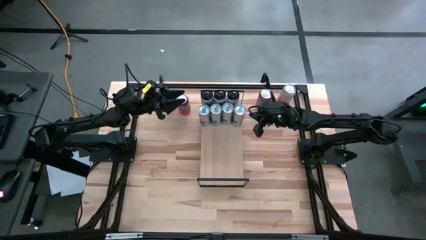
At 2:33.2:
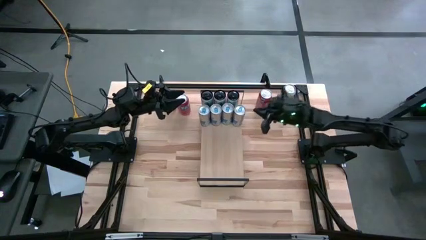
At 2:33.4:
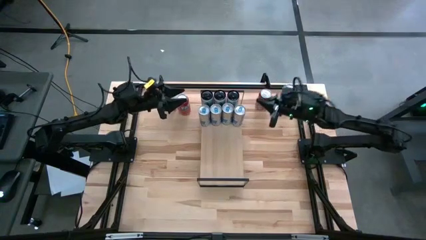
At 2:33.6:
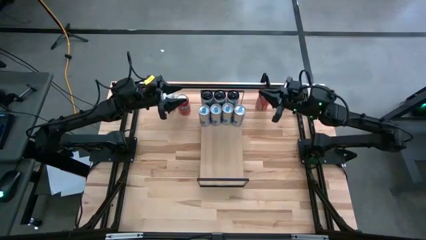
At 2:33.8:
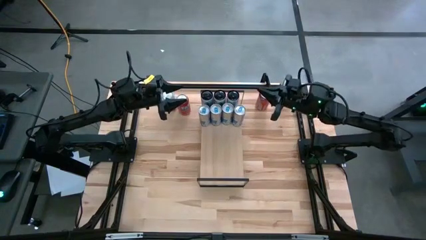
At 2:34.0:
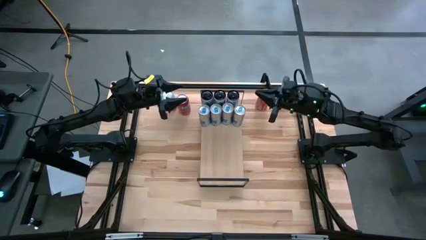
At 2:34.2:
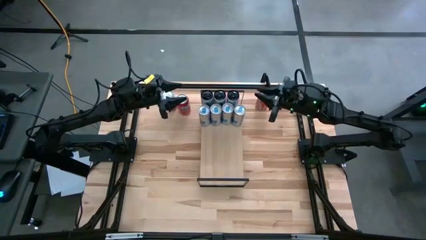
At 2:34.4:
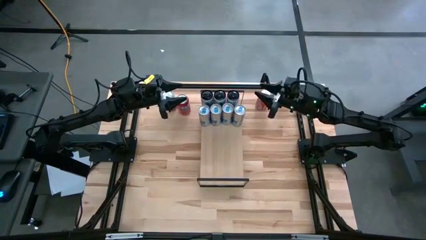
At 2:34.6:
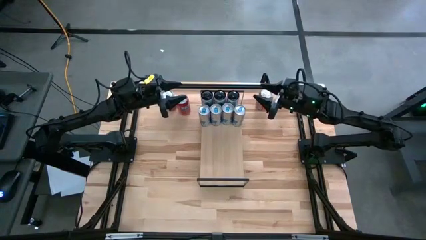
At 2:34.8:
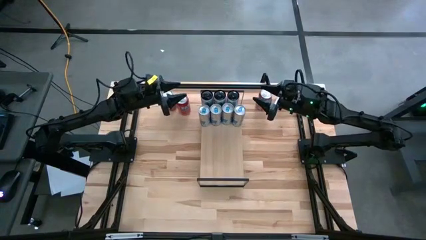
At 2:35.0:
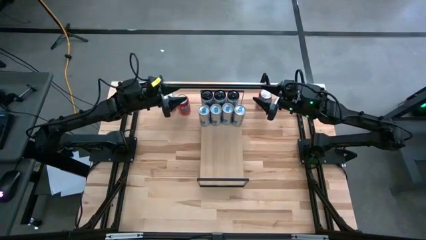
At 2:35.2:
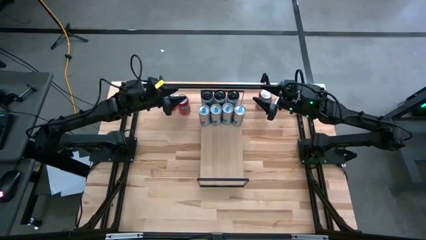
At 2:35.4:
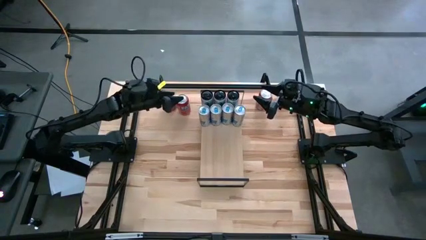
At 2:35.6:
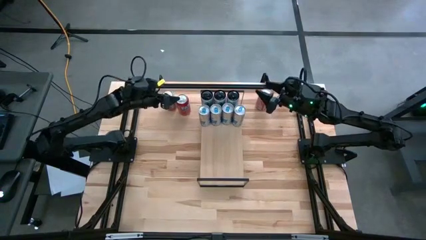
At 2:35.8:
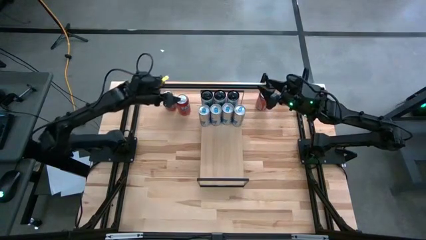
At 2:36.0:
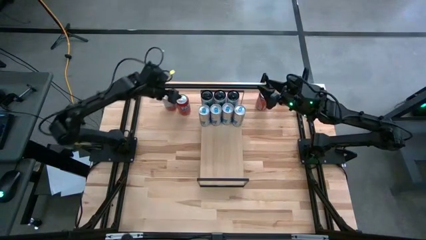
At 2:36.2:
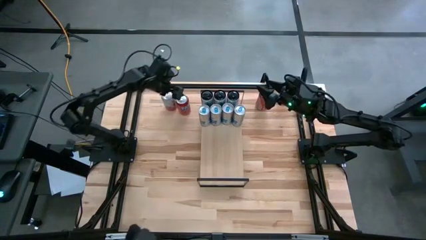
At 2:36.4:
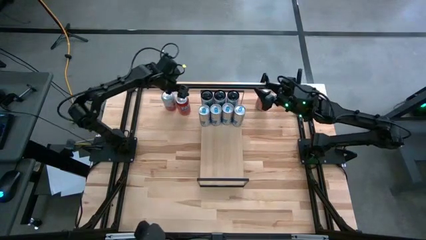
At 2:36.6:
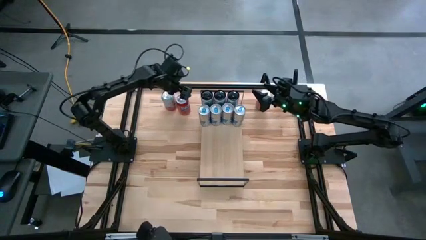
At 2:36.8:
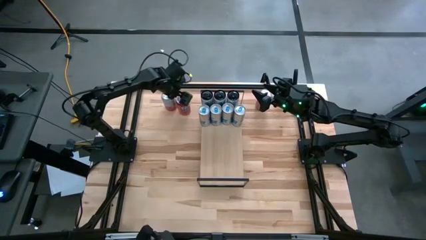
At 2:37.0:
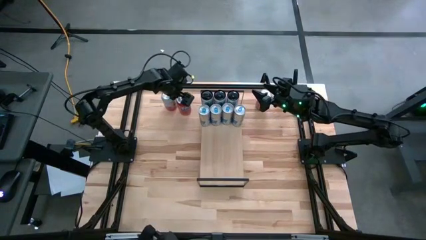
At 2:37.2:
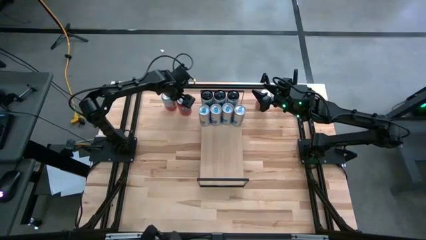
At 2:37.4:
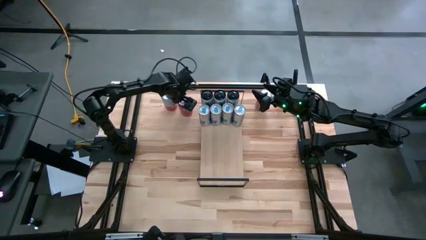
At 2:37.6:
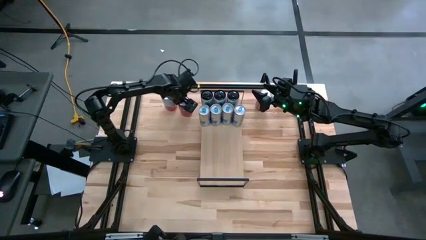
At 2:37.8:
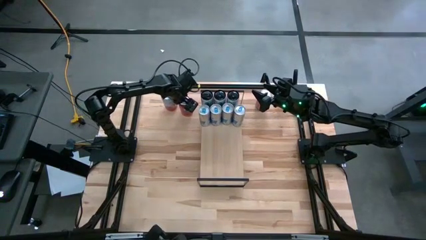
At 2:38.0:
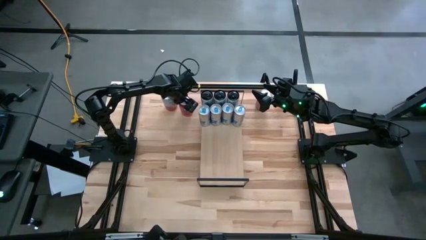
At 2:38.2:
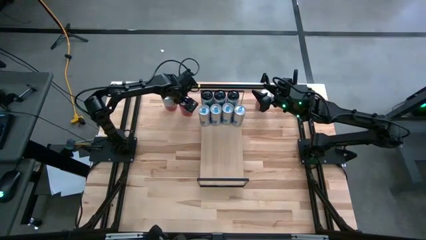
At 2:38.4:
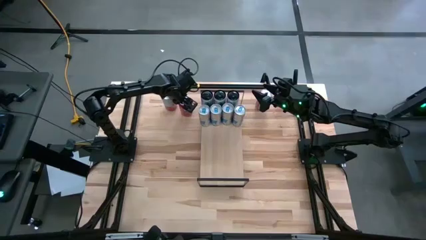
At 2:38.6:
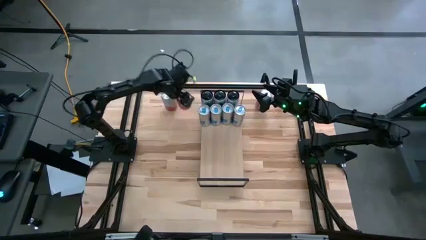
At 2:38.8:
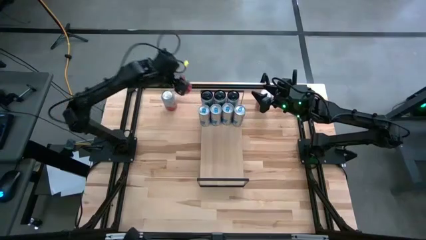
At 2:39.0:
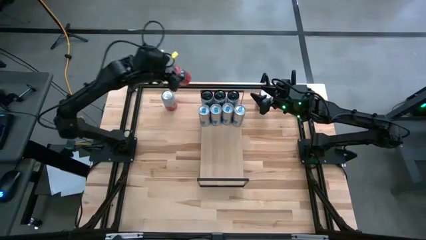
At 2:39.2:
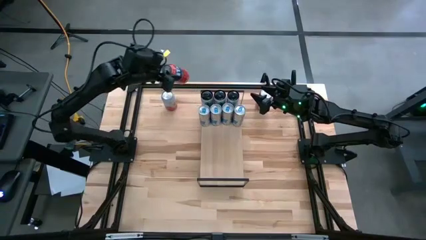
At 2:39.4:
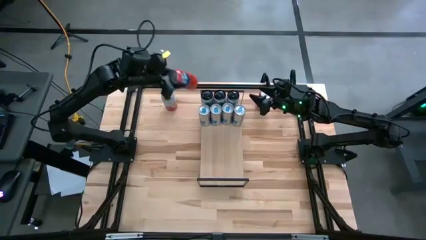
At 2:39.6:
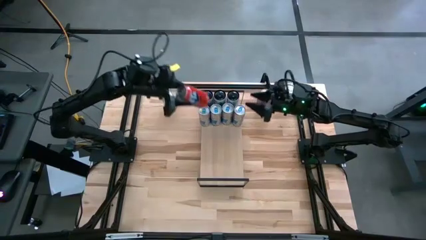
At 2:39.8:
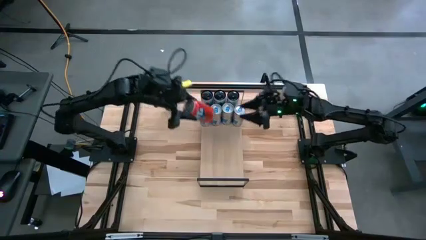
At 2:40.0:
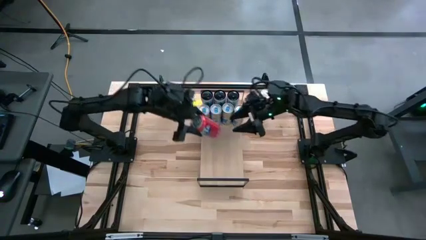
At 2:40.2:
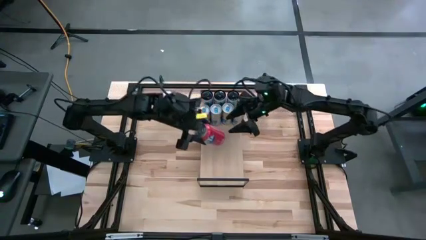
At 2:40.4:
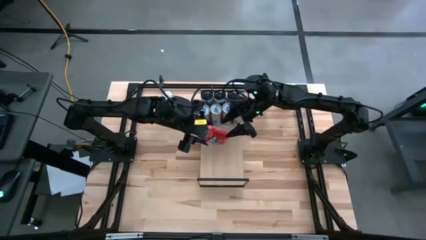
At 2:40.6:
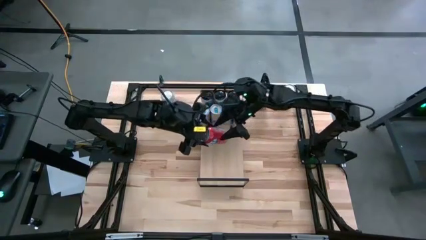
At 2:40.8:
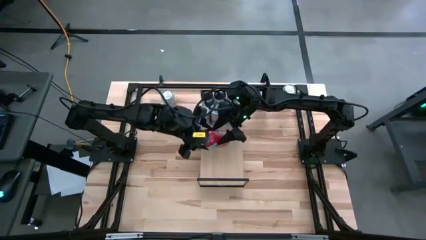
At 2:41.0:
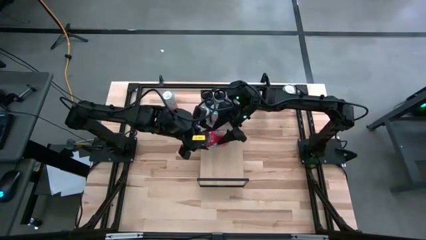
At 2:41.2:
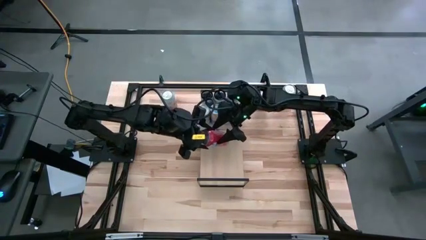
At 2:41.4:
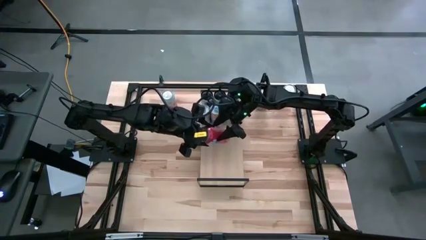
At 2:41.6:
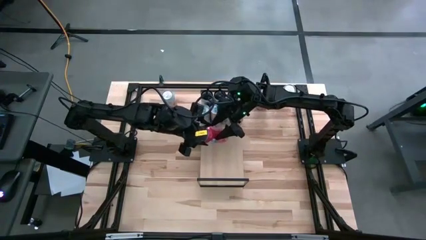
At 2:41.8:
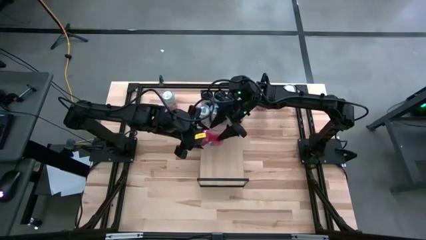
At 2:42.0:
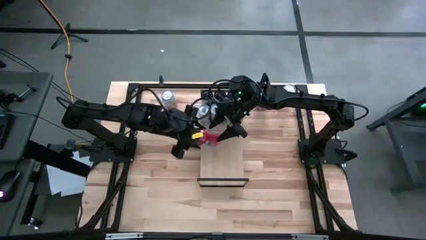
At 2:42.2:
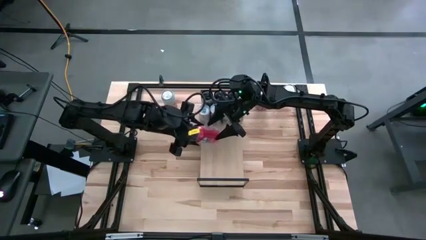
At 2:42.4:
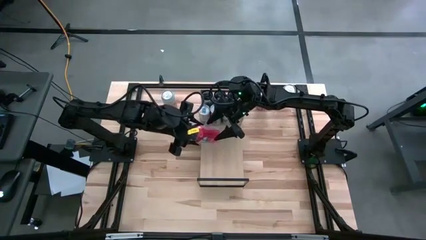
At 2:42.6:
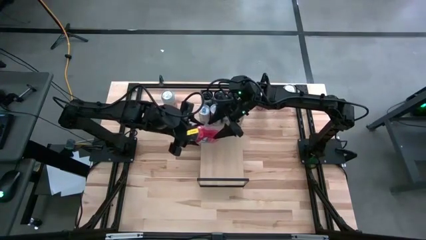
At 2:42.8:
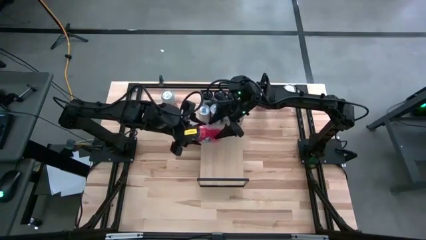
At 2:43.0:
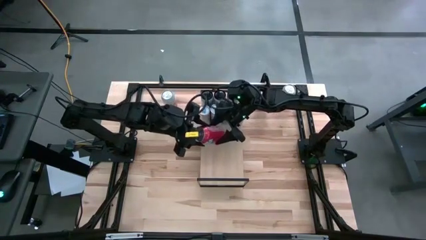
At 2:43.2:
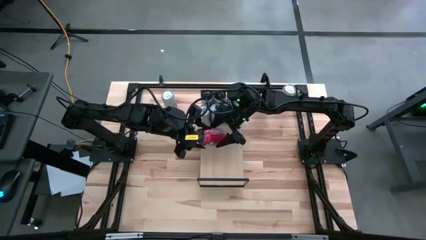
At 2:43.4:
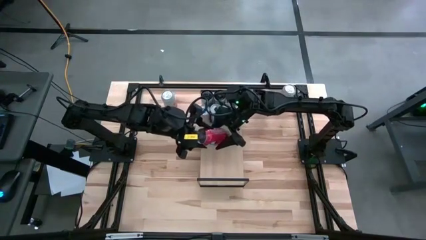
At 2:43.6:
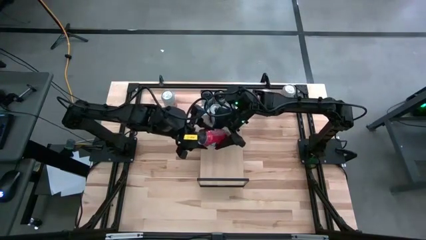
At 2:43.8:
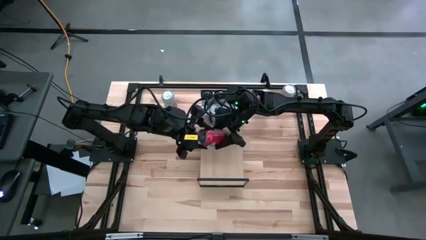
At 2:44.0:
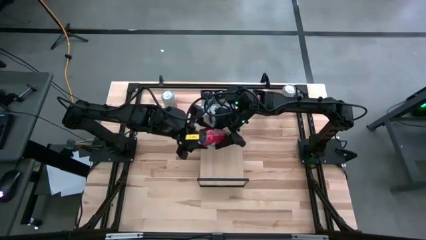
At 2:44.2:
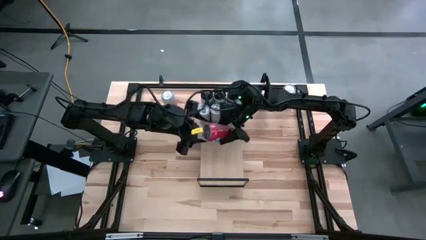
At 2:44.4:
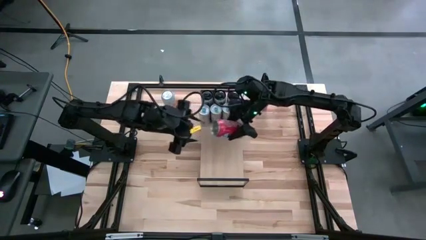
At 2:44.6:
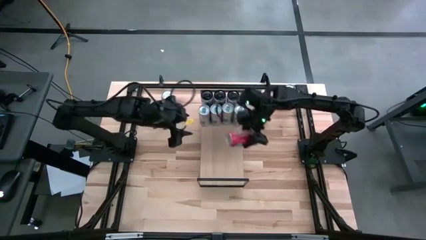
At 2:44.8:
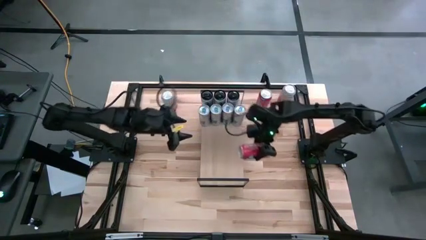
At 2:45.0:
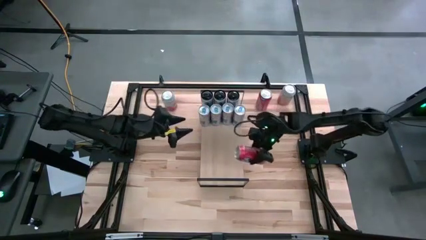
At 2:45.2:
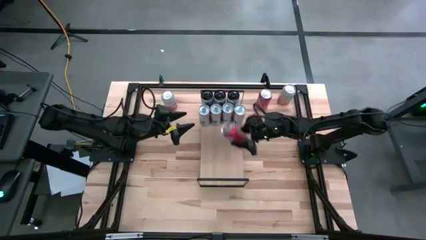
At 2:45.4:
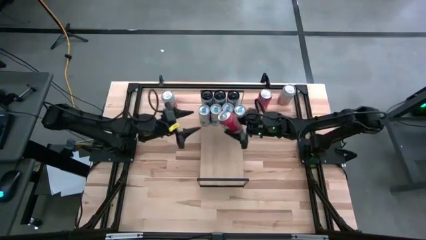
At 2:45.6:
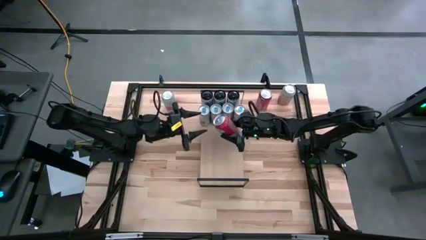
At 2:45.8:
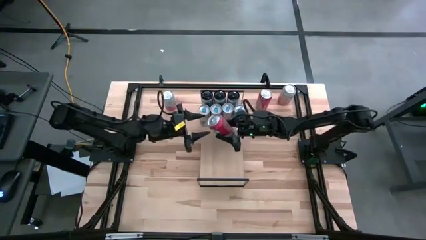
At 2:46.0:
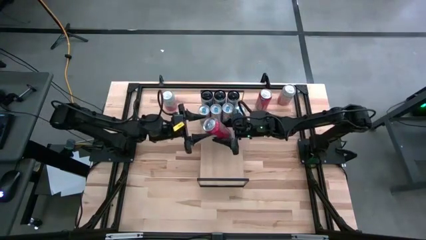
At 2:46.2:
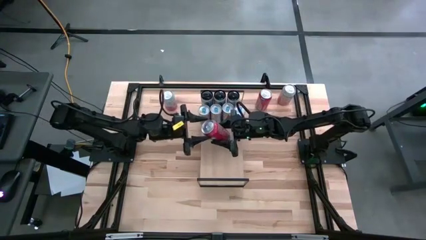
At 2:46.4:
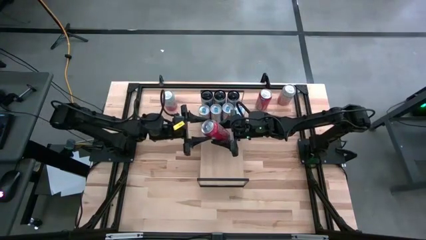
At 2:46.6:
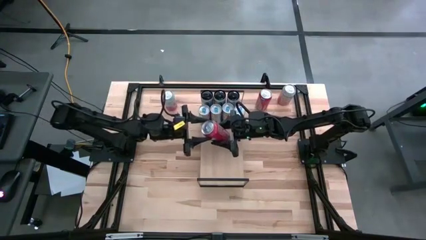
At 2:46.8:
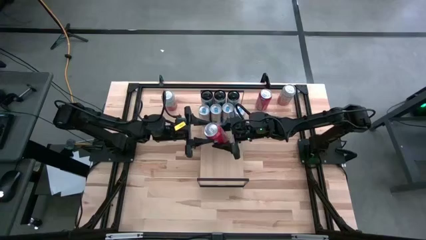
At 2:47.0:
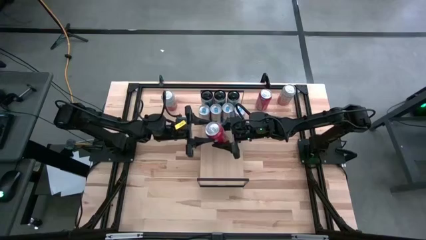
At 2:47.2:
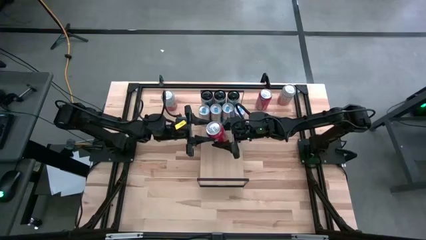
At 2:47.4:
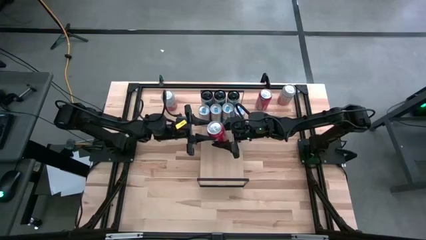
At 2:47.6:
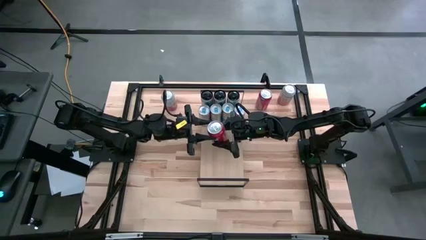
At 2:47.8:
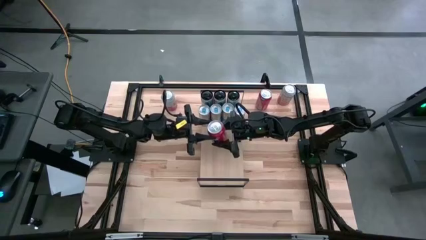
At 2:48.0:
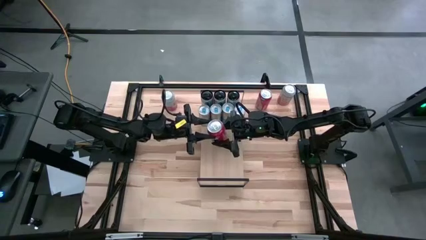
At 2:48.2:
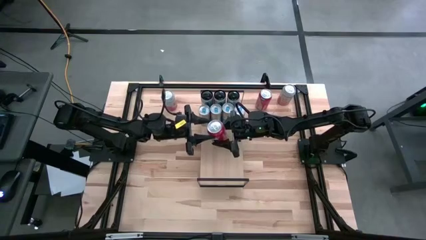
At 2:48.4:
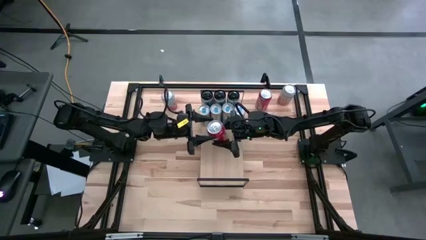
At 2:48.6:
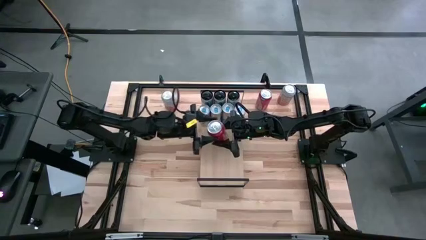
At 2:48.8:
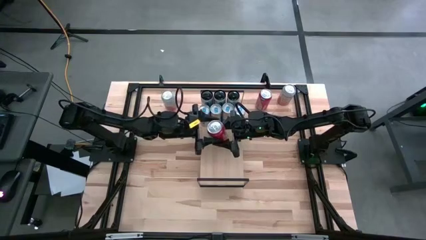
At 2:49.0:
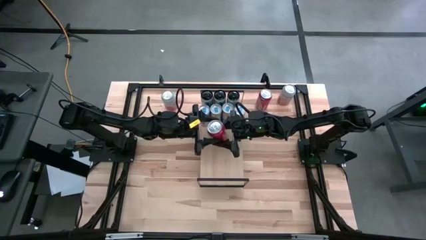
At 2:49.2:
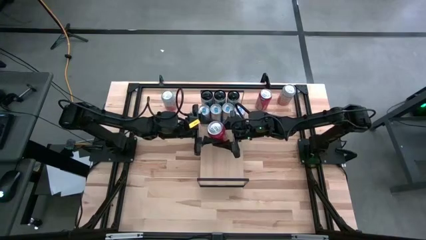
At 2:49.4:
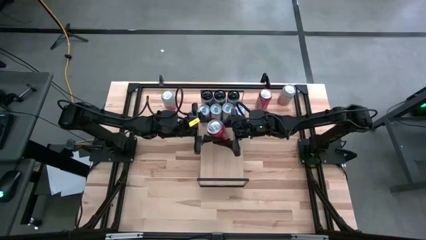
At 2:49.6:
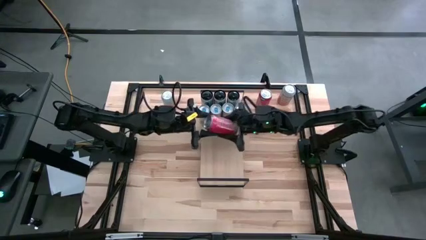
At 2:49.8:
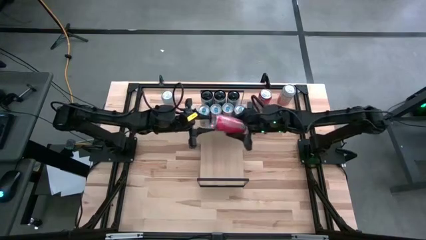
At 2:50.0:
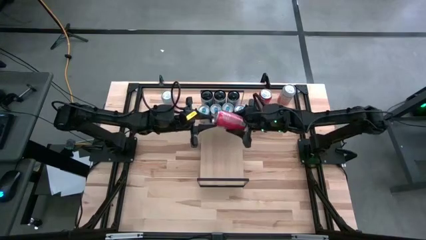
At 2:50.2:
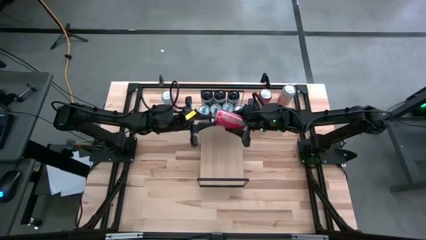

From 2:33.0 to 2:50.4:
Task: Place canned beverage on shelf
Put the left red soda can on the shelf
